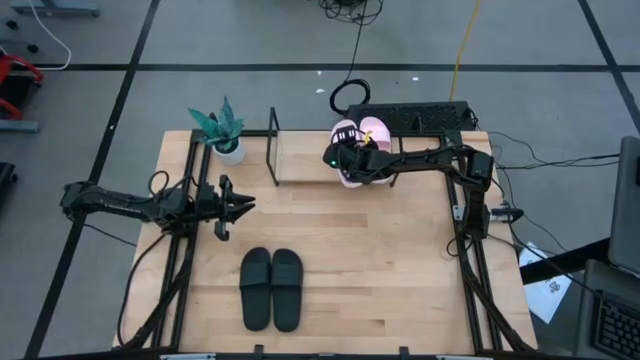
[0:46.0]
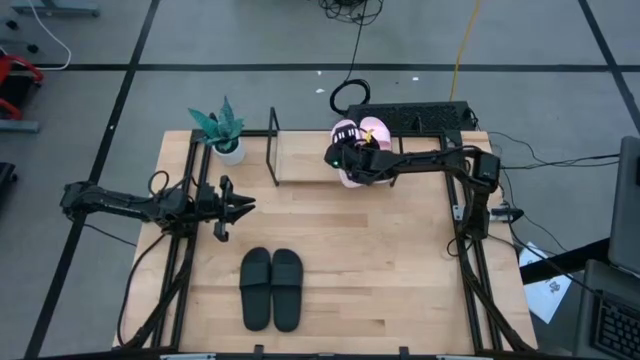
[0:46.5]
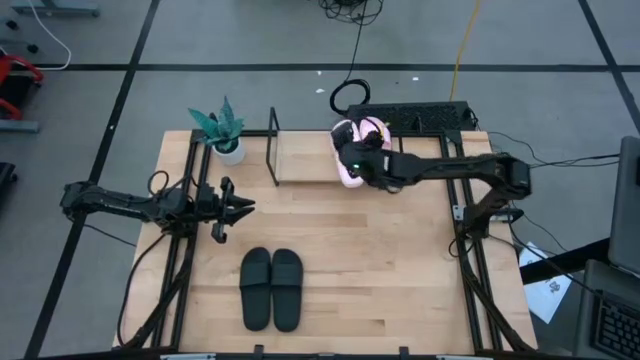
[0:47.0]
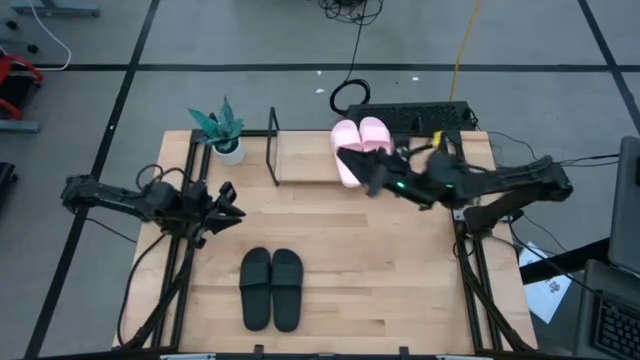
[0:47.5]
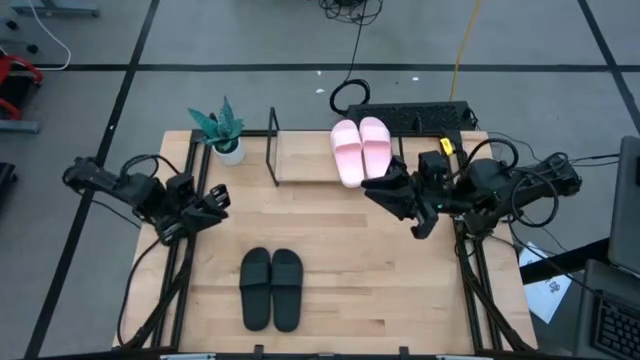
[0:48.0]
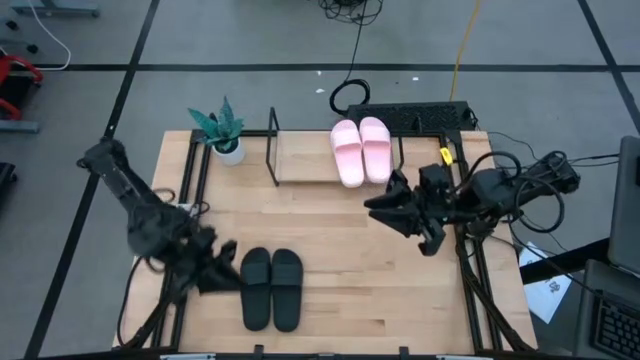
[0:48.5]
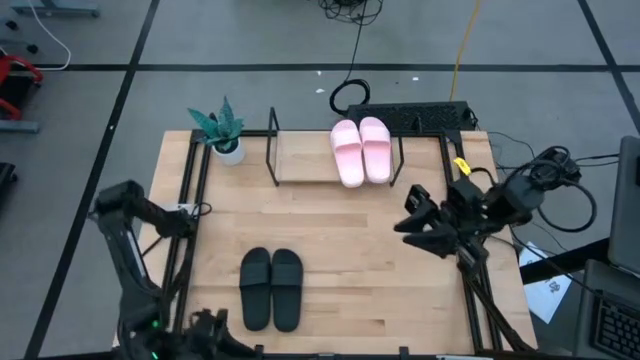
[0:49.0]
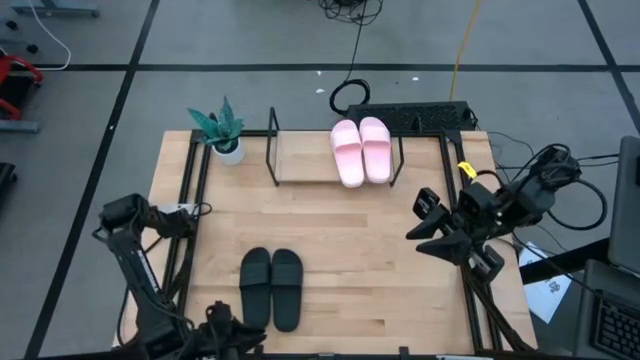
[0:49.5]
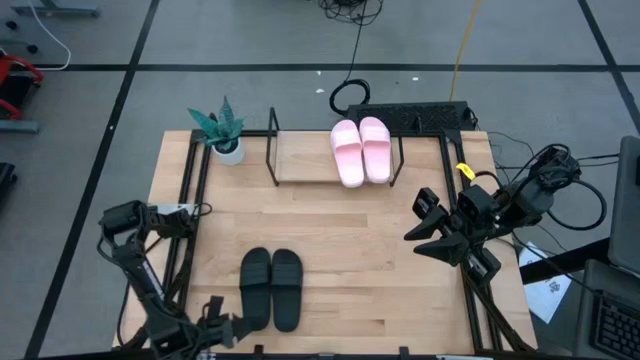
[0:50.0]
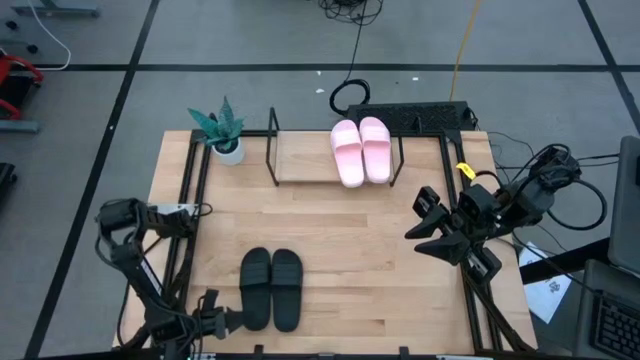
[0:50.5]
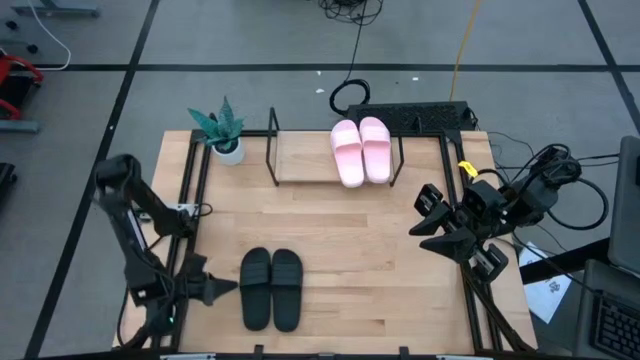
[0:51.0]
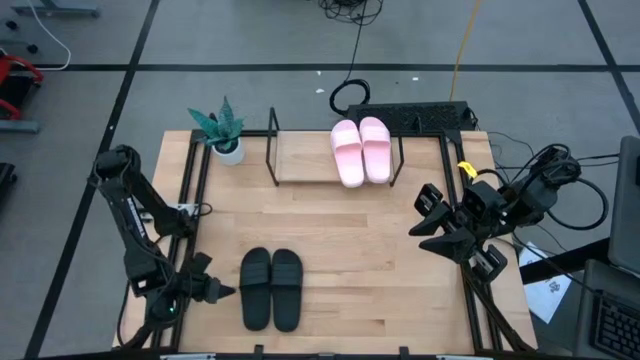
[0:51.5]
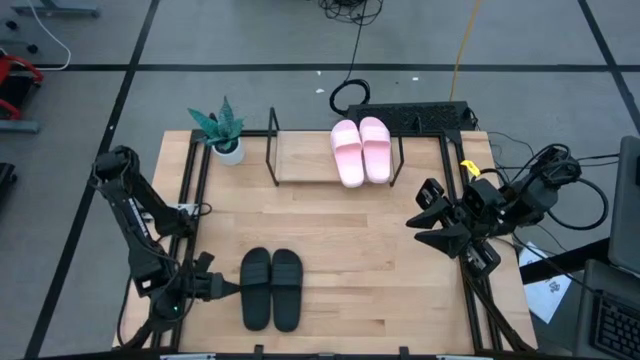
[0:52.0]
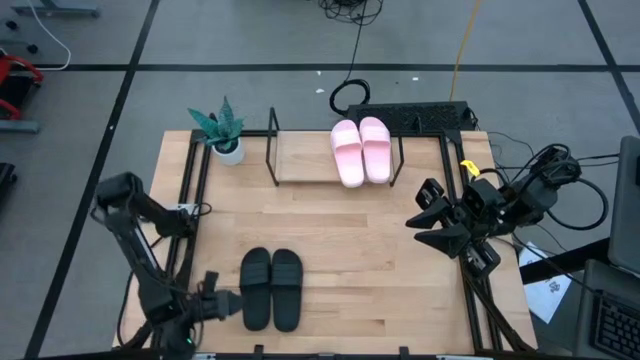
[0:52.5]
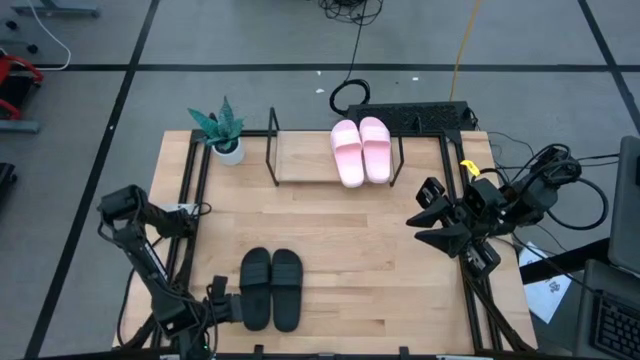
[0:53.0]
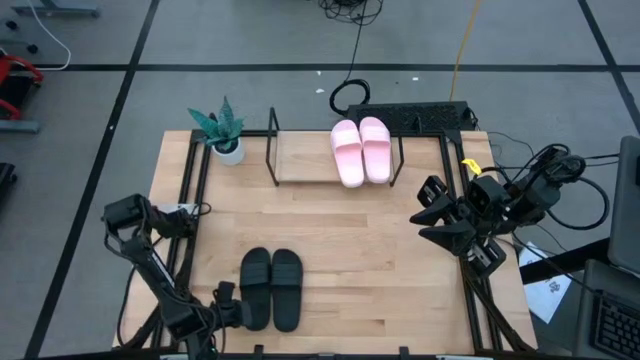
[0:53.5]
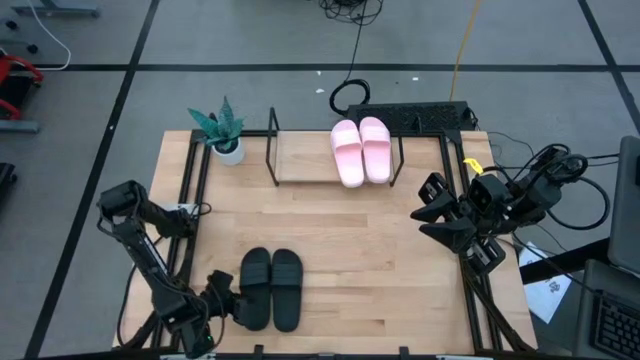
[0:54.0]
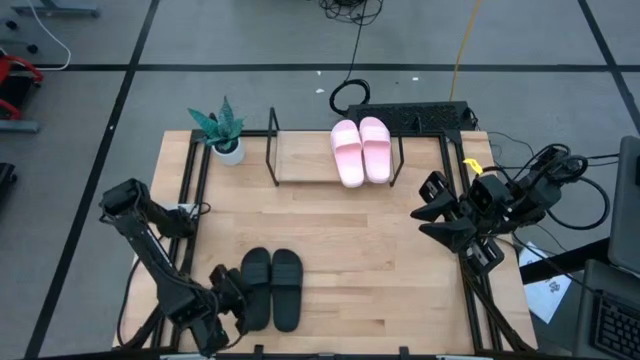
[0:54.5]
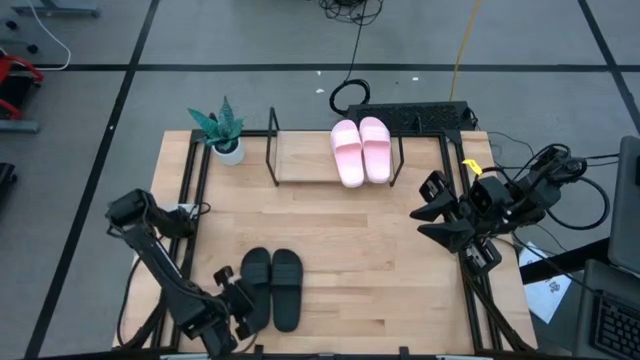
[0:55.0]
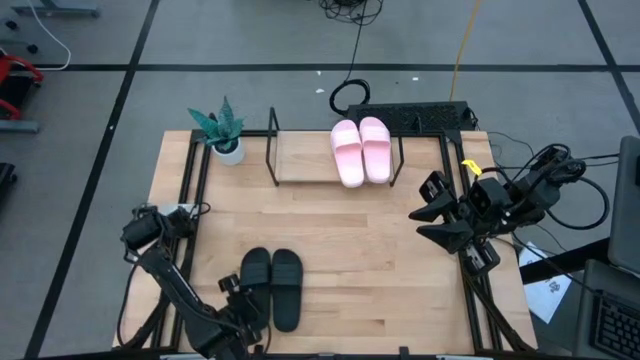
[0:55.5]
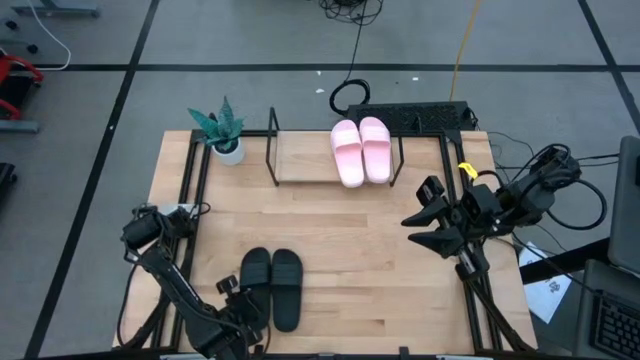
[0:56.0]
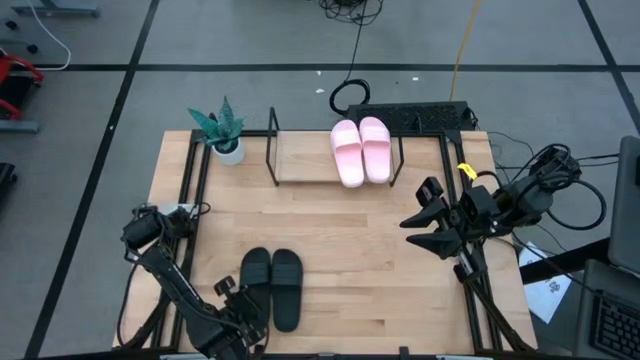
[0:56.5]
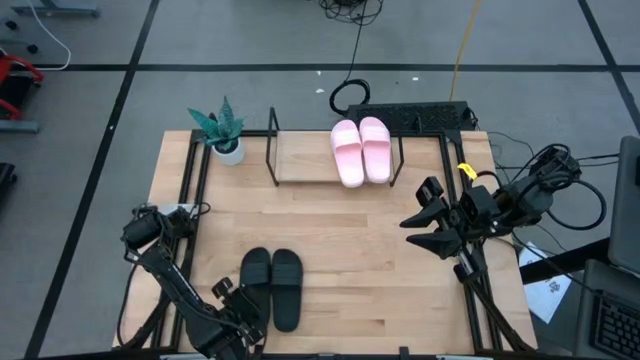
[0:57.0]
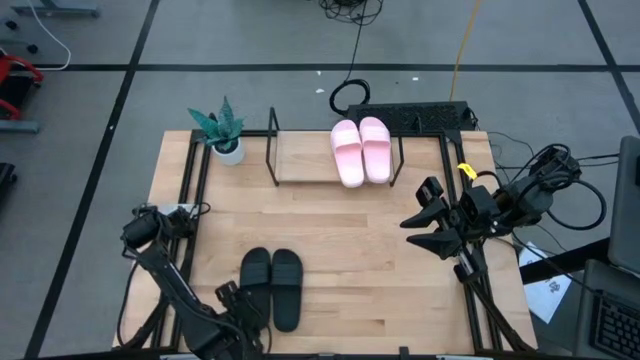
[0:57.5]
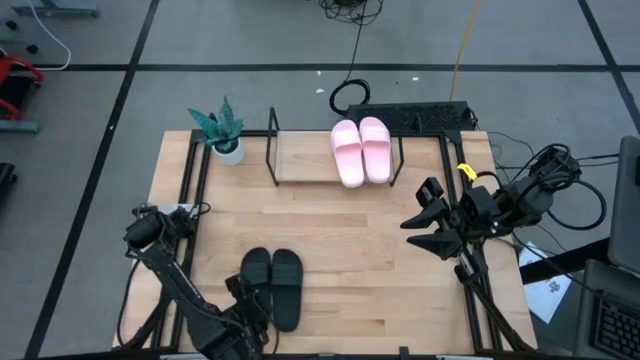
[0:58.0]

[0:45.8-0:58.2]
Task: Pick and place slides into the shelf
Put the left black slipper on the shelf
